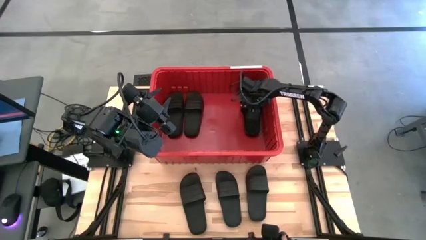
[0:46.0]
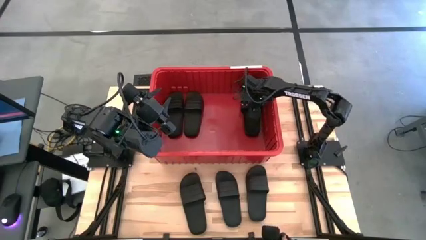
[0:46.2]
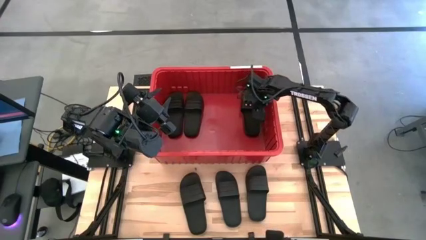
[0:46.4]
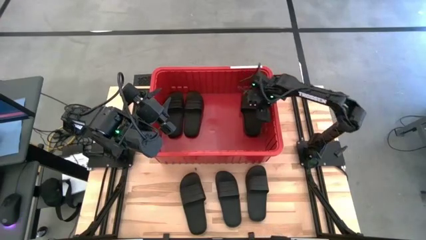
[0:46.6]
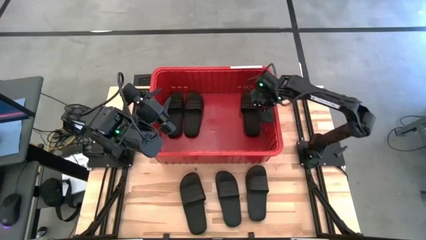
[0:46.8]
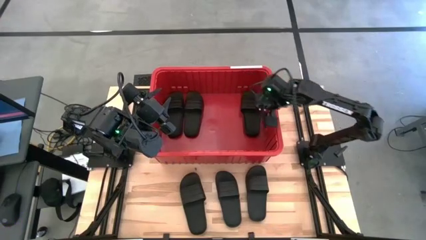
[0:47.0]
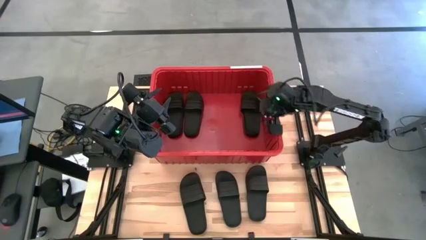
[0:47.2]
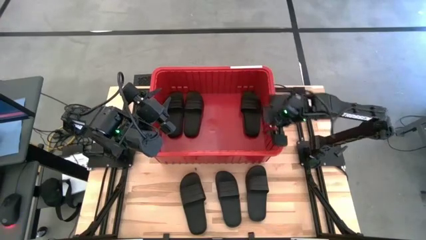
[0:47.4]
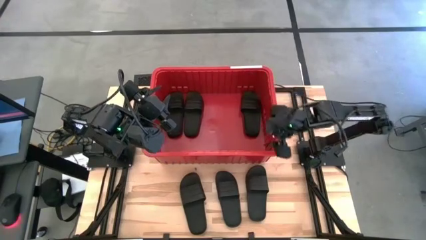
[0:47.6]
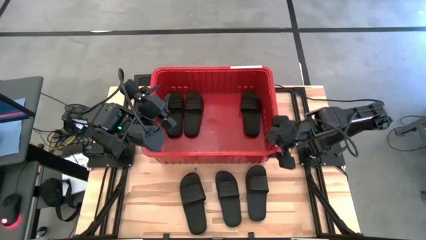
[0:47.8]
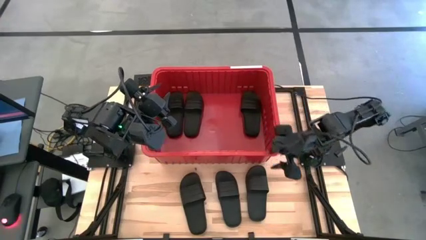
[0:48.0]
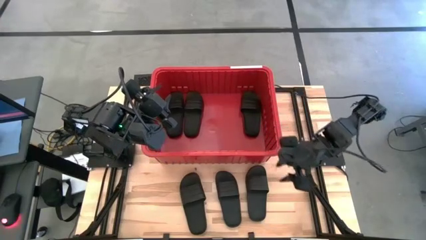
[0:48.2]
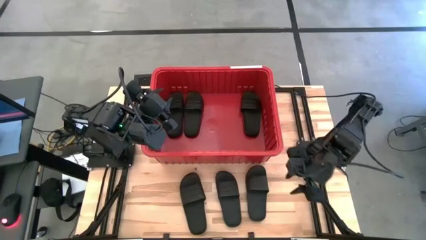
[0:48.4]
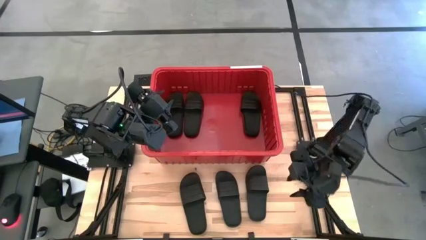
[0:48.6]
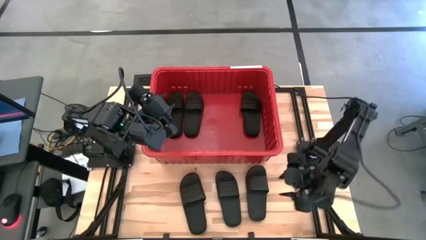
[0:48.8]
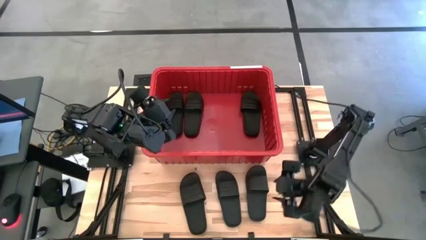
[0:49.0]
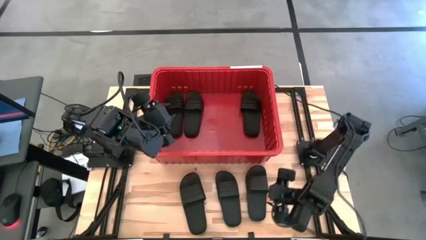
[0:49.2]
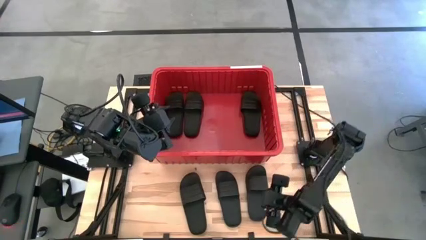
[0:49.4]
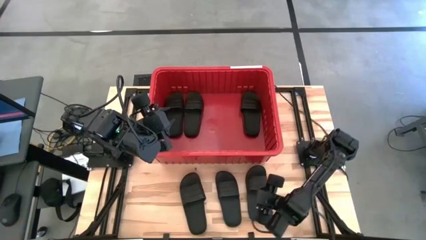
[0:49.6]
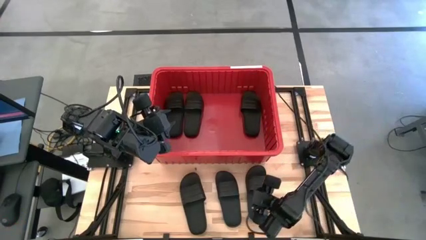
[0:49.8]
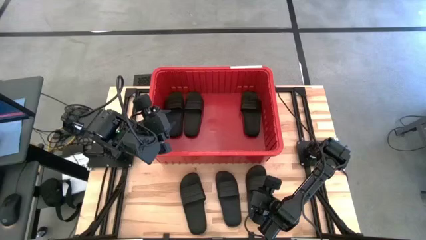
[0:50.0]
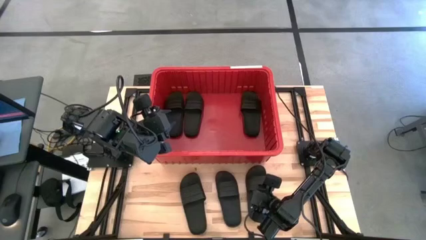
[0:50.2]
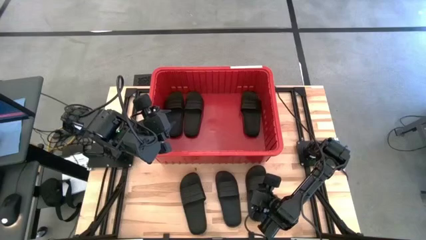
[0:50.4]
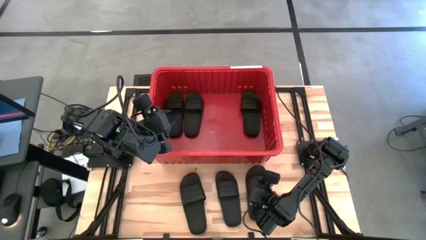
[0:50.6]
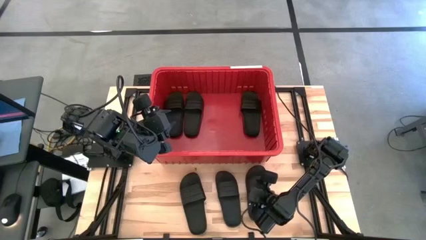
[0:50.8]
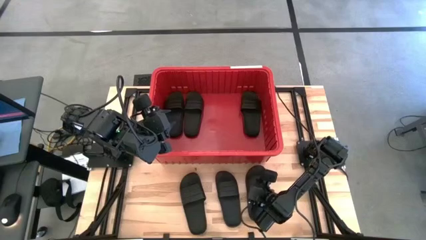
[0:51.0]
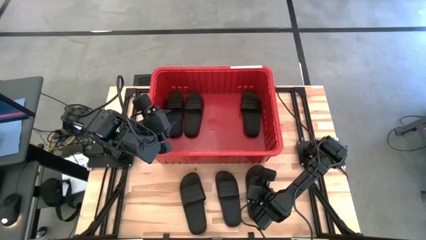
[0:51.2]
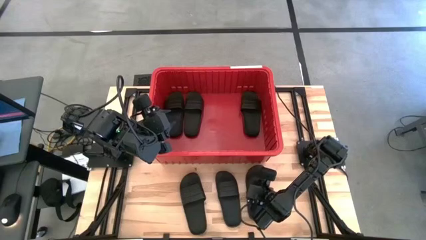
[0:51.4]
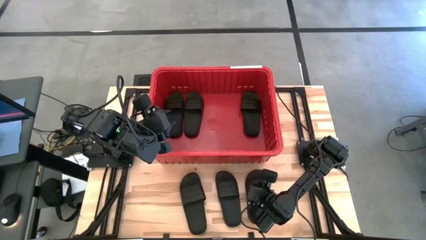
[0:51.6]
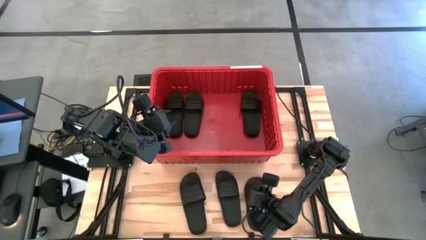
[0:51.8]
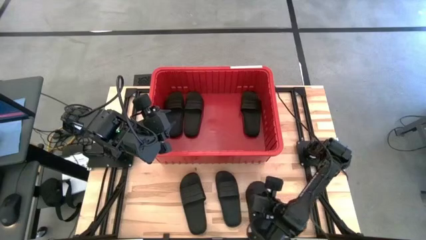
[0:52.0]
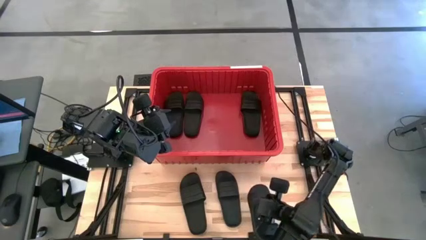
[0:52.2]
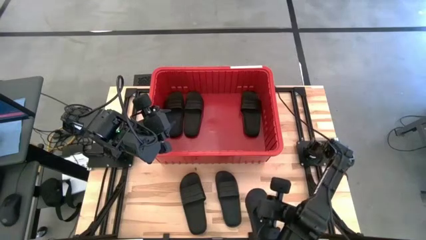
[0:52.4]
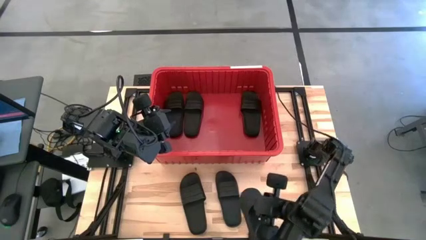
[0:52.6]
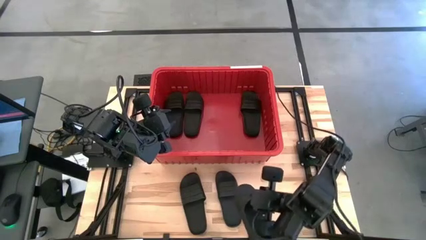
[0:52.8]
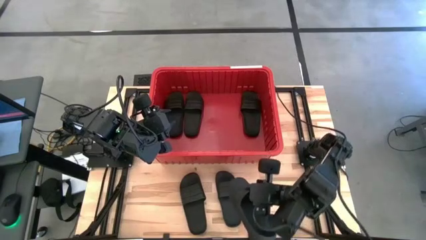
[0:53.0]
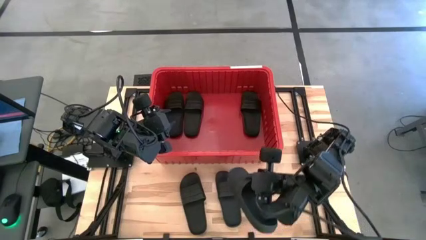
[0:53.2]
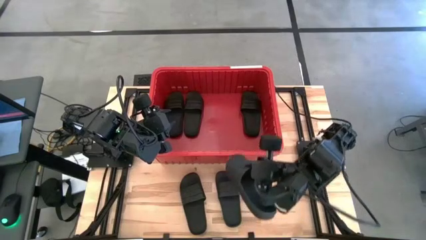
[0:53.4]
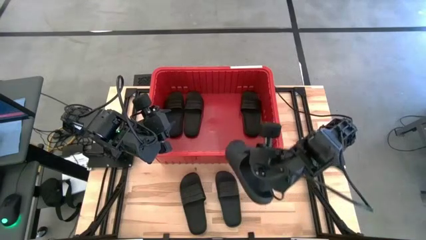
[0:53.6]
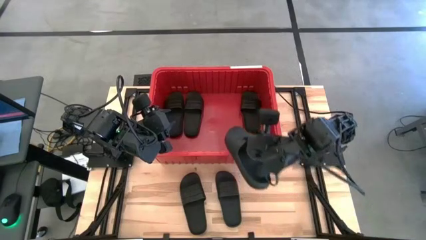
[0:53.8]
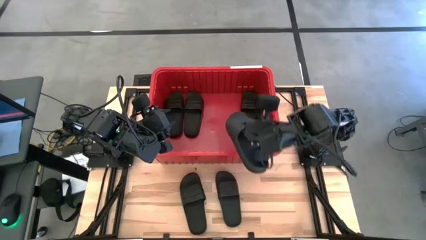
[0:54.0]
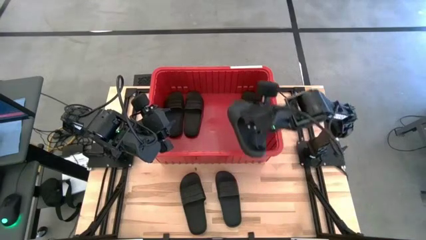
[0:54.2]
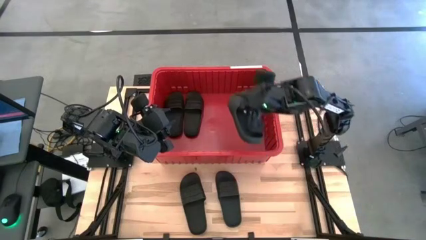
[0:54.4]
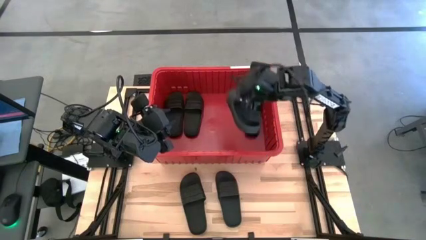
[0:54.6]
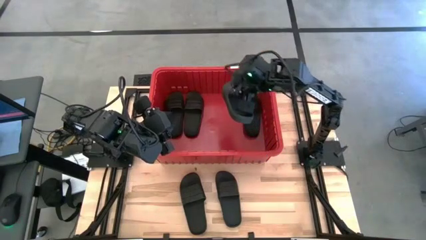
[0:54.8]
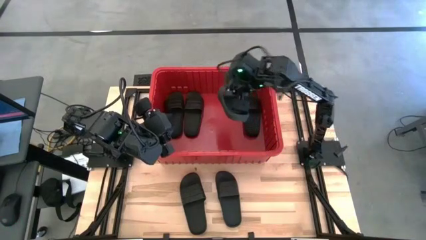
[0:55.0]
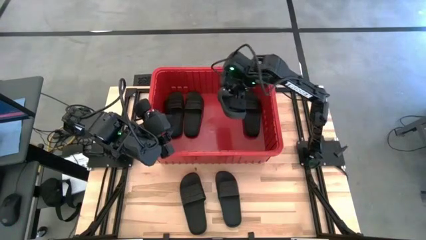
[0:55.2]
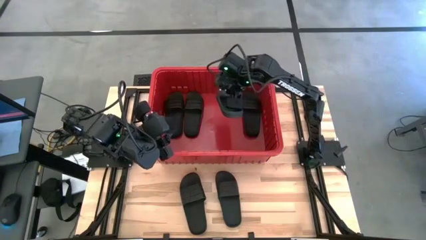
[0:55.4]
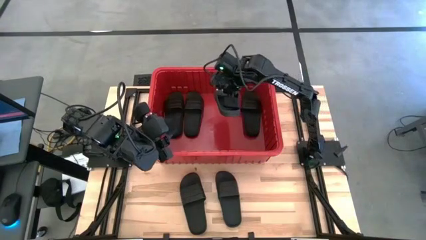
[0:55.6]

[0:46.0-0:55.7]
Task: Pick and place slides into bin
Put the black slides into the red bin

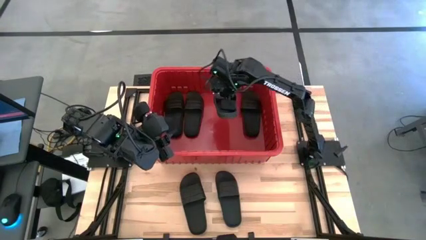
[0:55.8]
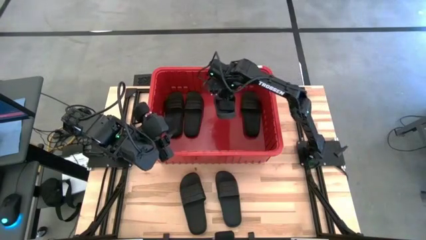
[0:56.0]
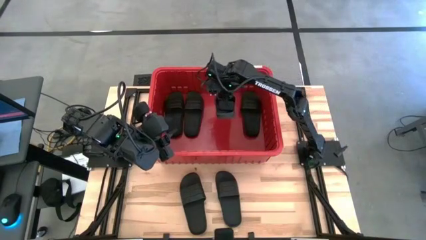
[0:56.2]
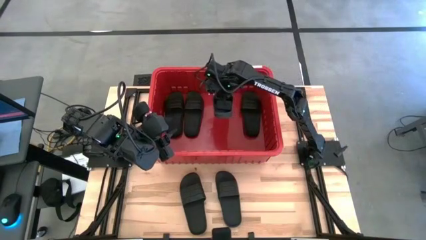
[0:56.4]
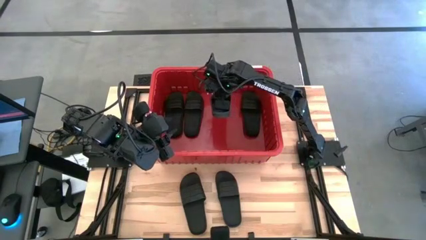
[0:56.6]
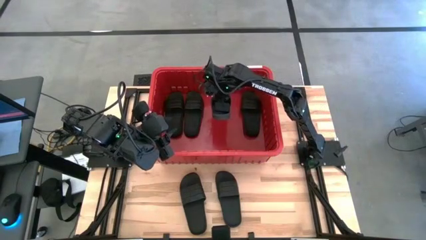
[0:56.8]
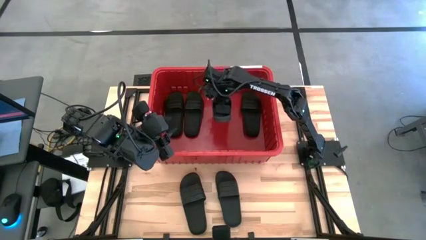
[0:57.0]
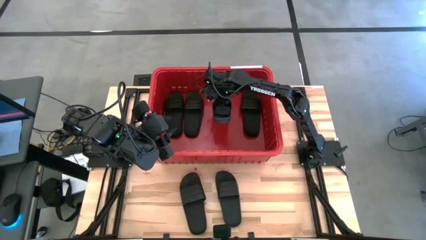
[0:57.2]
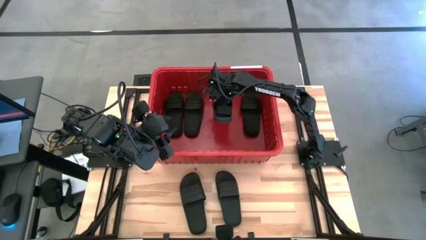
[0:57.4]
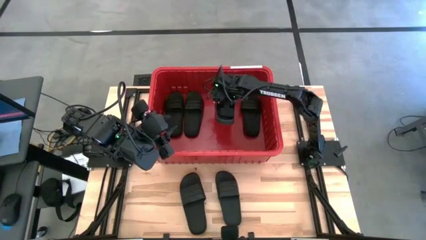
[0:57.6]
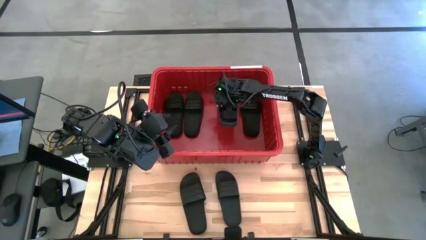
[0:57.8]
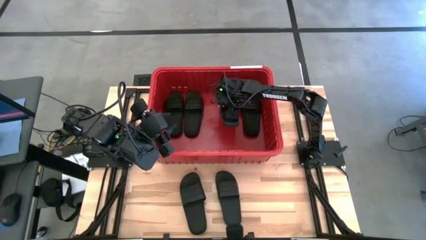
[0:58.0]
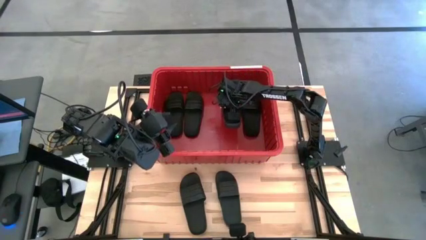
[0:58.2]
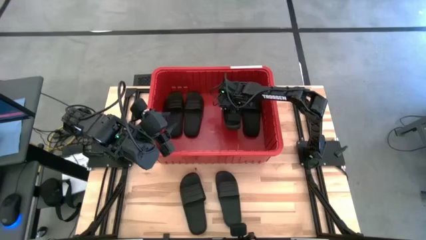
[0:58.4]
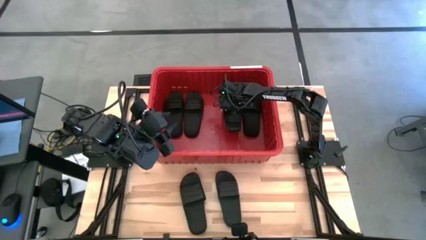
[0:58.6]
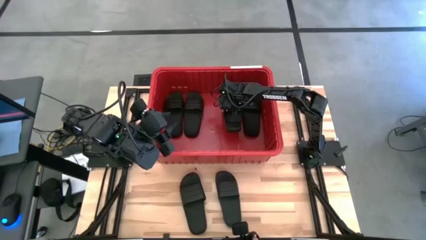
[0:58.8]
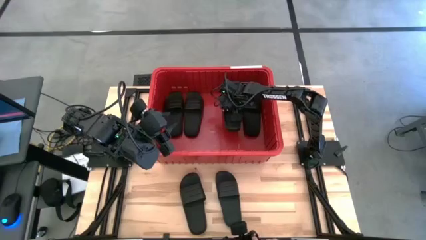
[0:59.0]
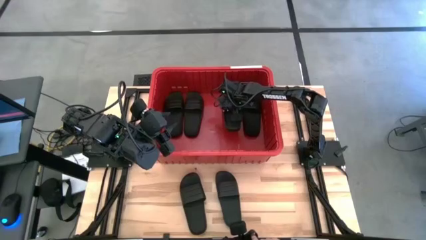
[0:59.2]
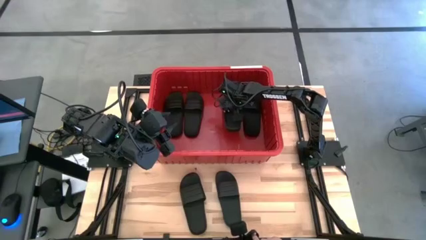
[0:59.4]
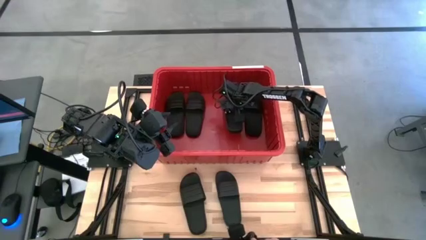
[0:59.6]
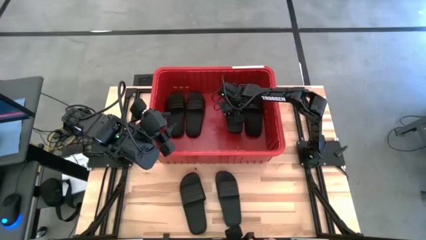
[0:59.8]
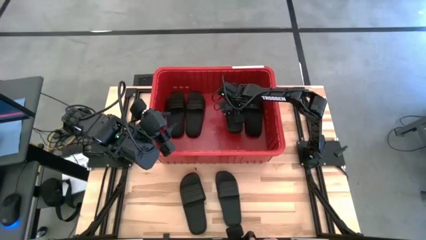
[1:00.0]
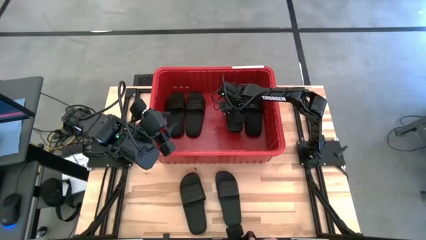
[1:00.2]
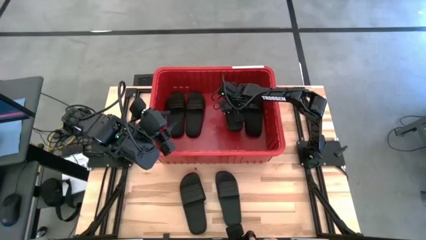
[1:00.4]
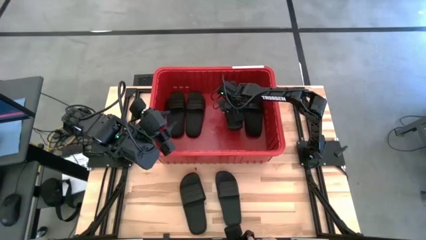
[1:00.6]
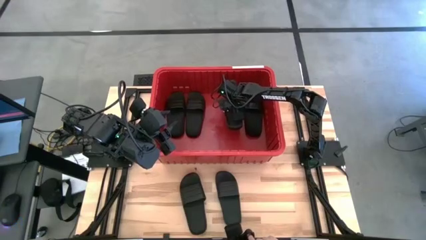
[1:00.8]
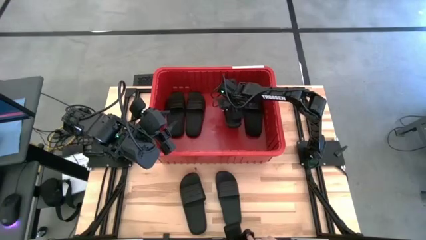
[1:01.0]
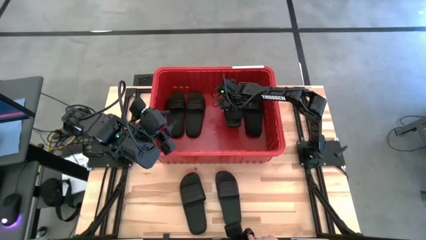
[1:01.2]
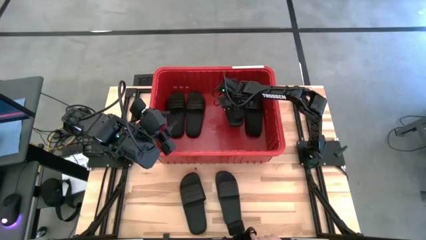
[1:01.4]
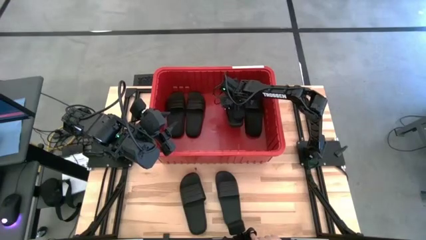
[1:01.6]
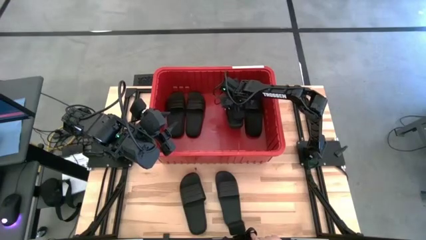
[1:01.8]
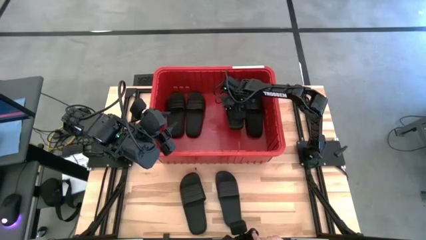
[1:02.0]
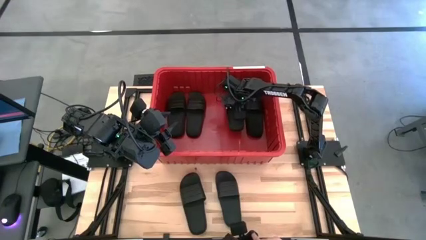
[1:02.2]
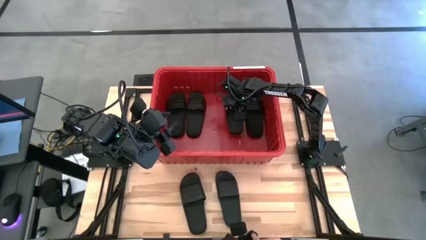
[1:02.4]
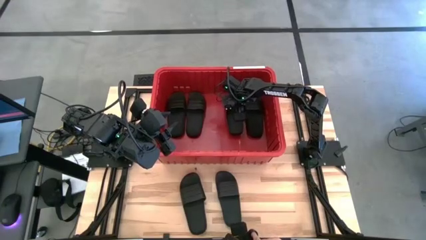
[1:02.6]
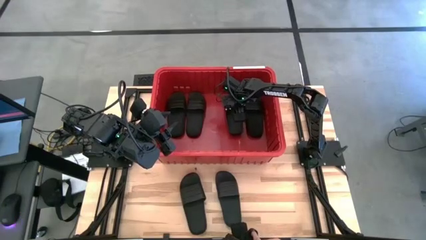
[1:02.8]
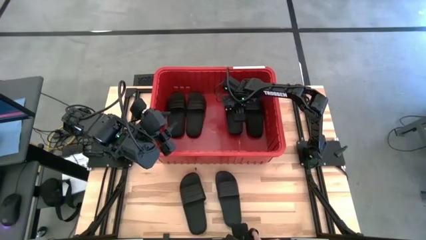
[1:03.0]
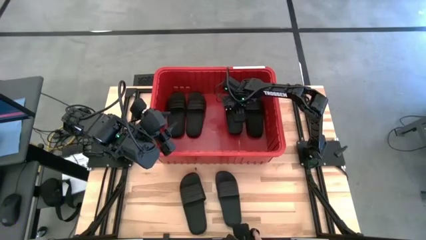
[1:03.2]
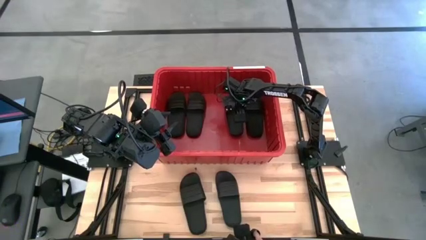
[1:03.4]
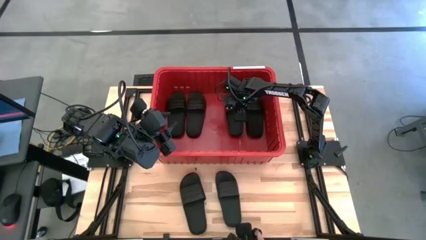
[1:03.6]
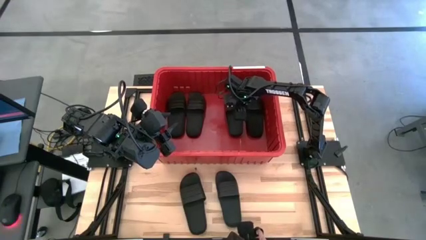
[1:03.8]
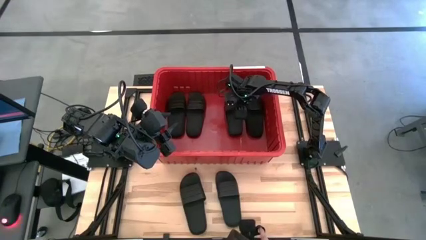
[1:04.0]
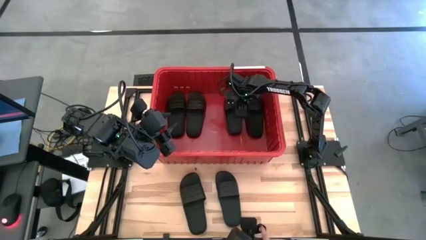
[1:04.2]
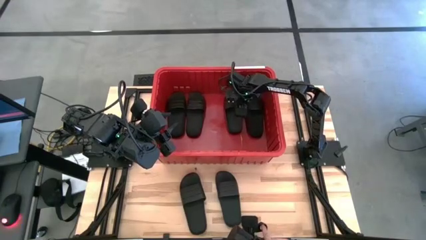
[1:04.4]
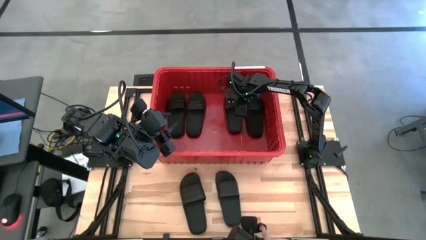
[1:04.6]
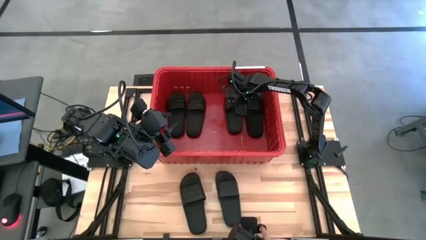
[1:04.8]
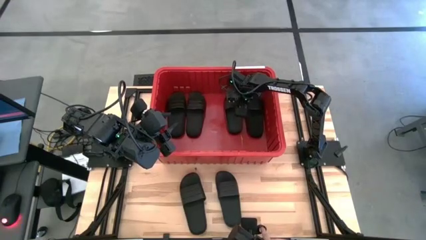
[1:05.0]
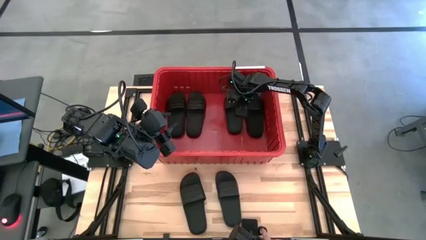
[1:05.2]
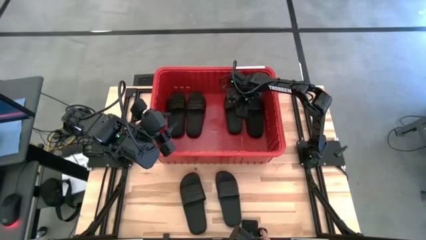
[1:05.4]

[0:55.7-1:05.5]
Put the black slides into the red bin
